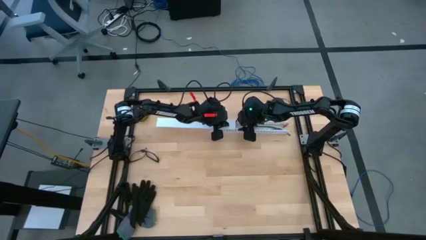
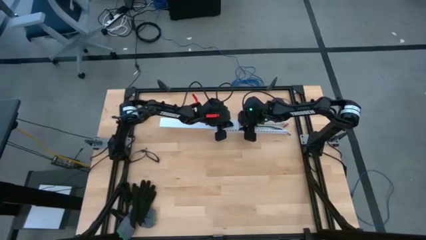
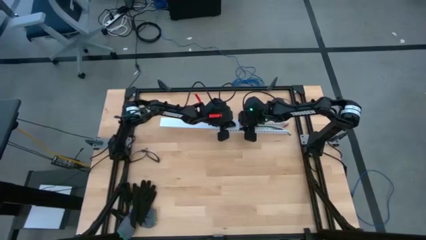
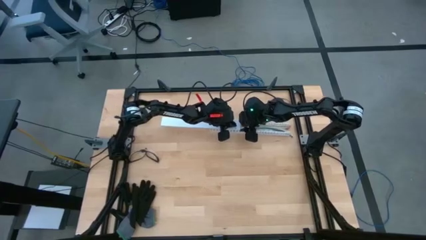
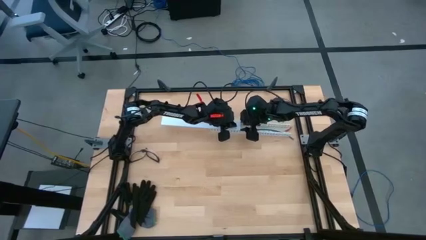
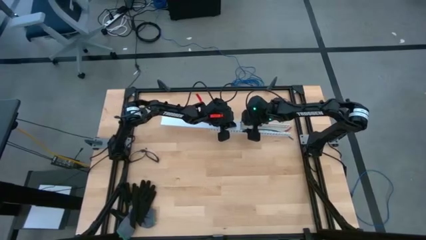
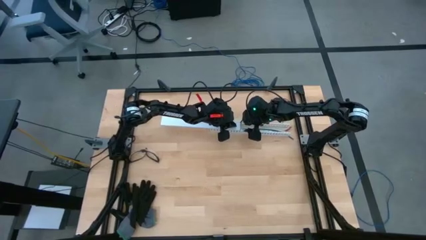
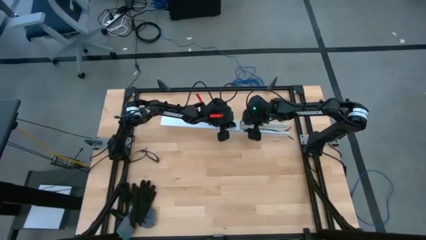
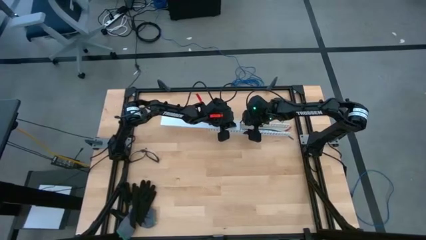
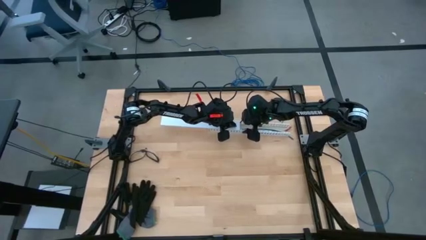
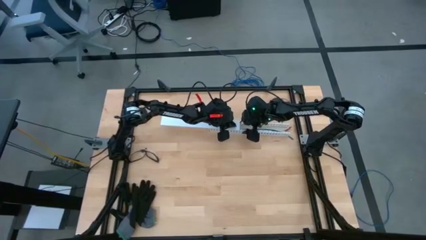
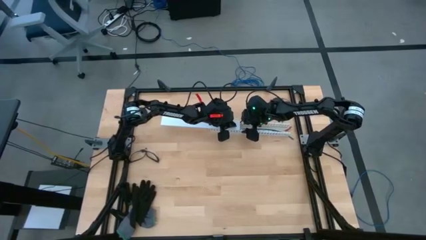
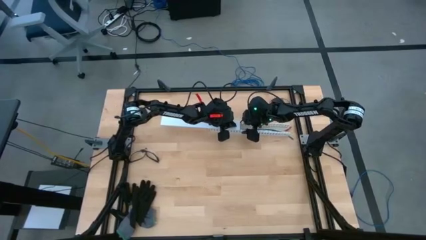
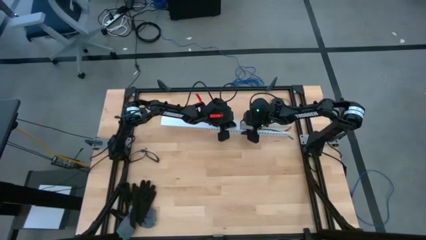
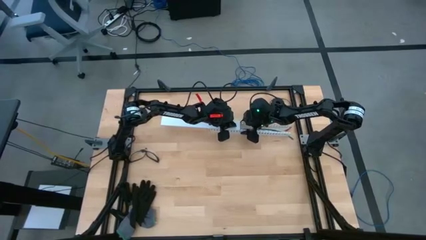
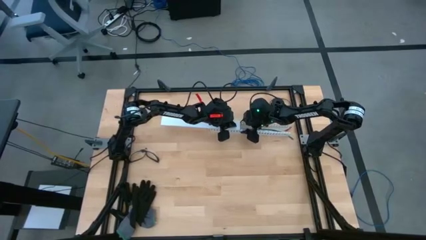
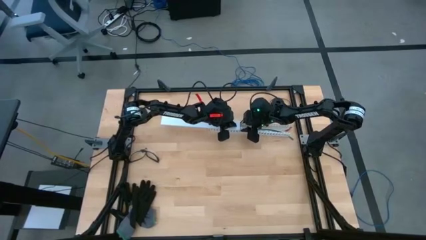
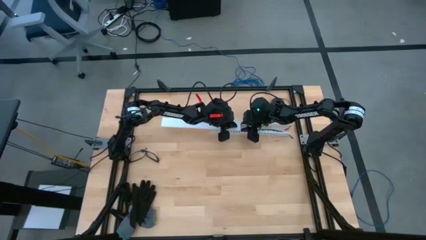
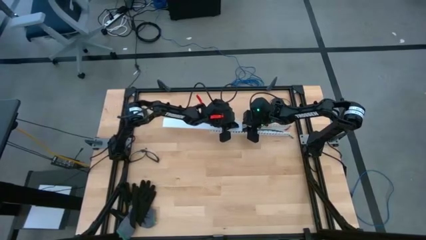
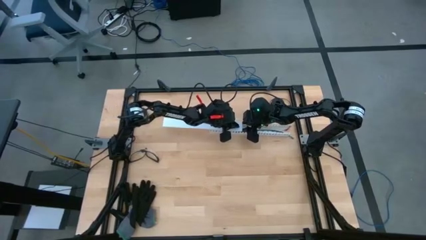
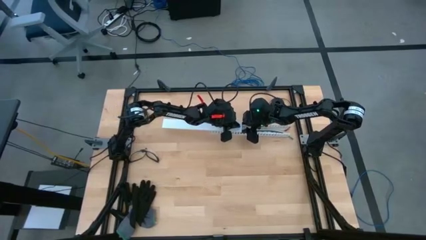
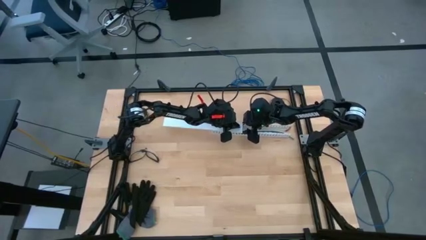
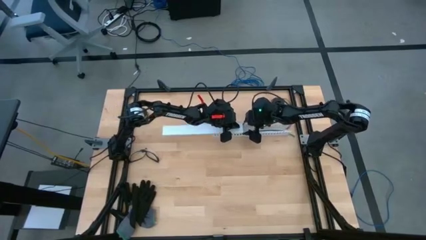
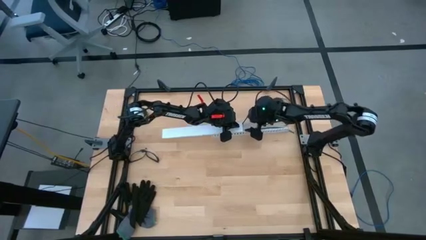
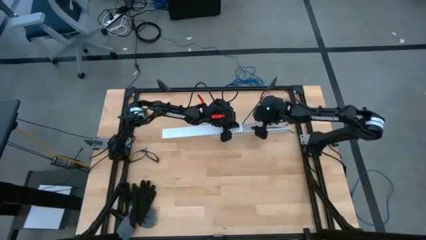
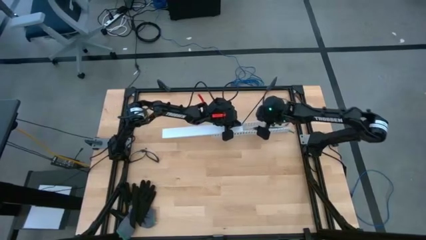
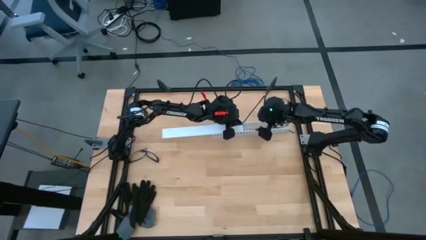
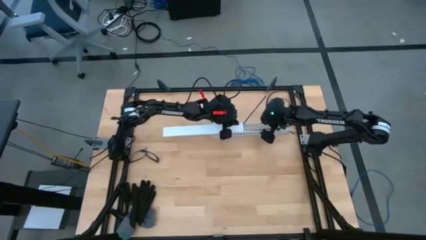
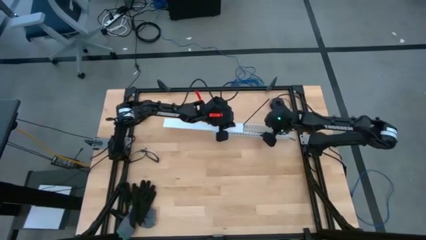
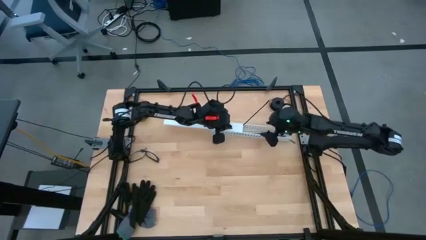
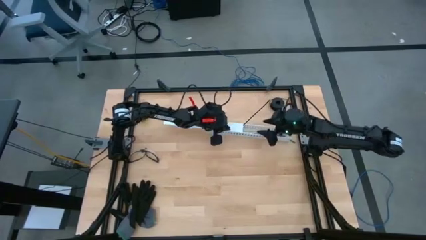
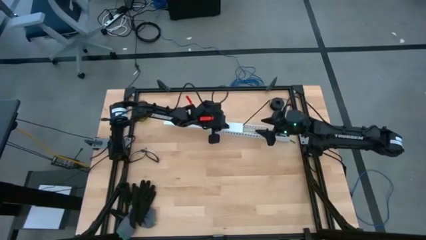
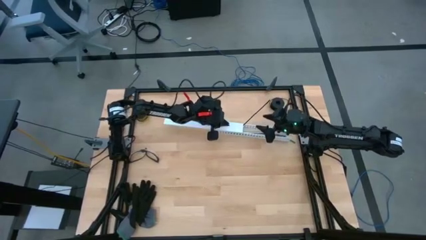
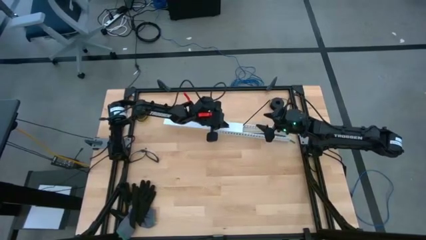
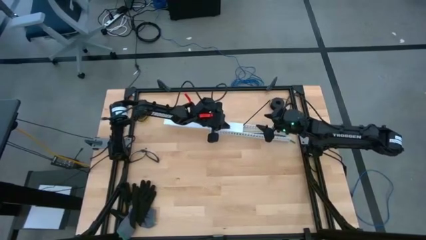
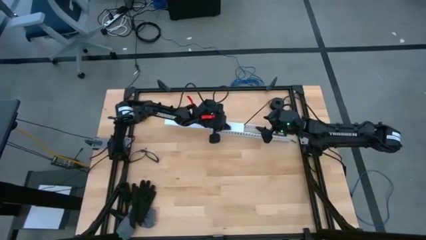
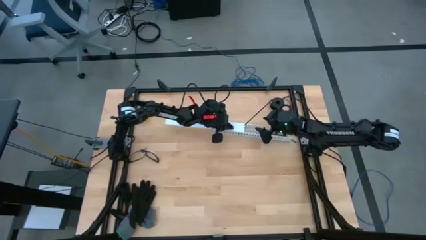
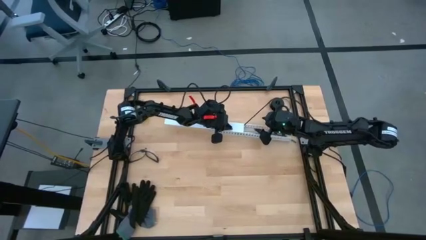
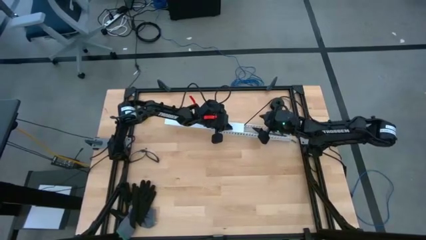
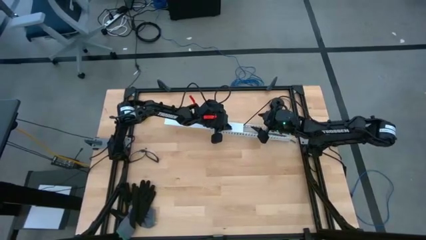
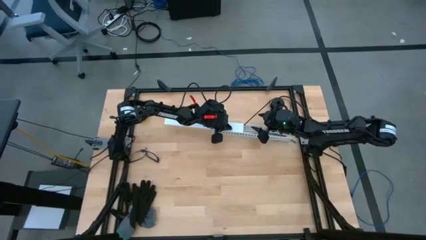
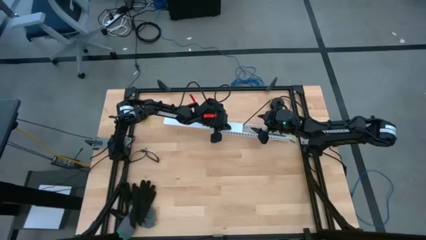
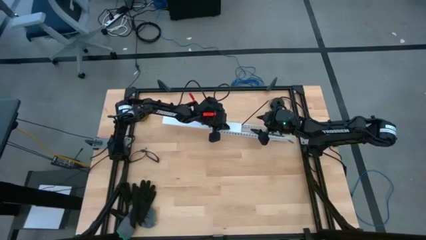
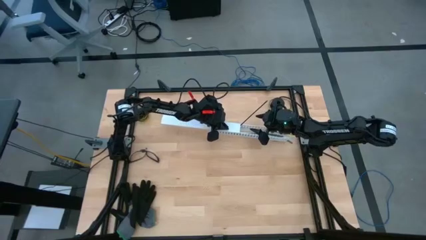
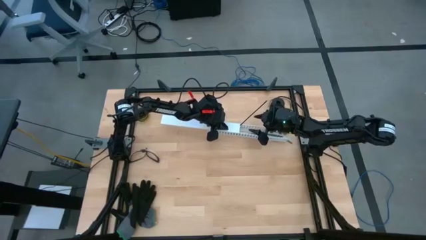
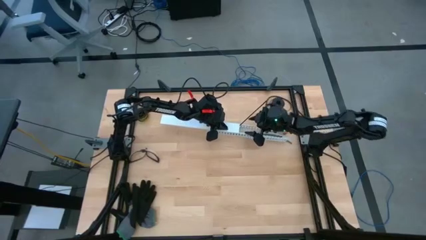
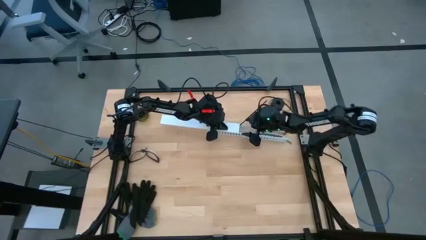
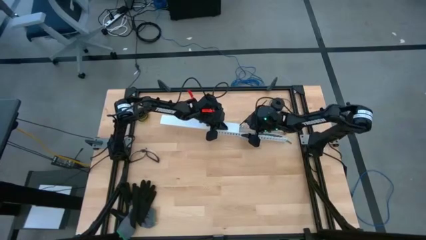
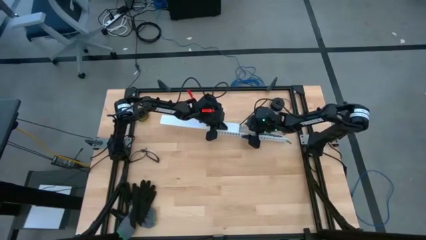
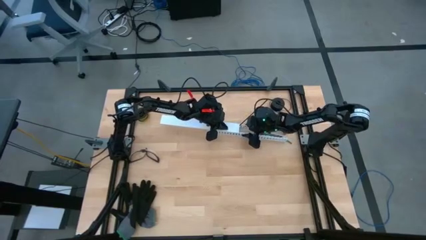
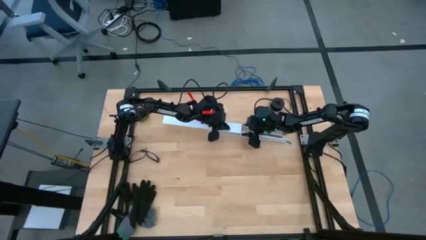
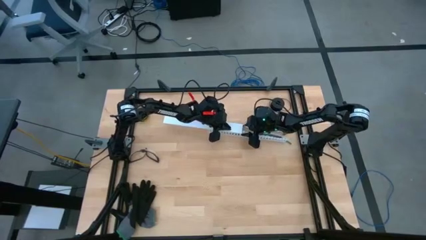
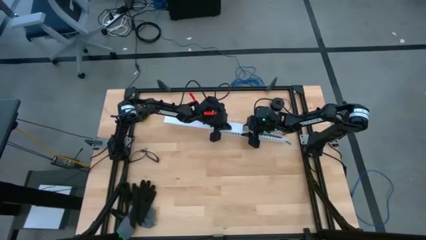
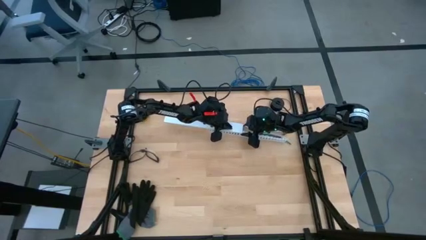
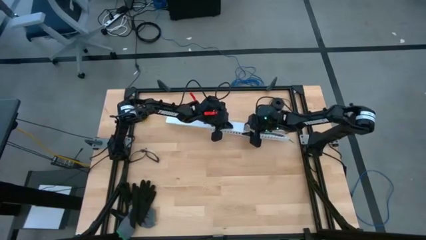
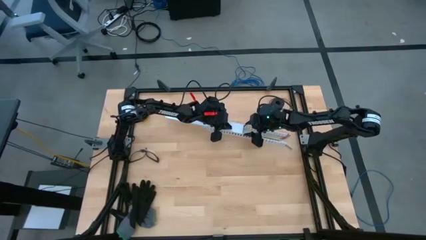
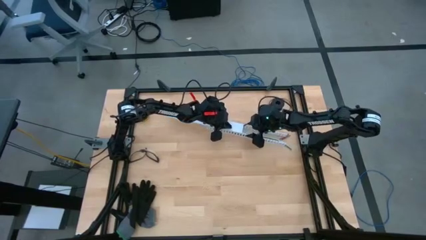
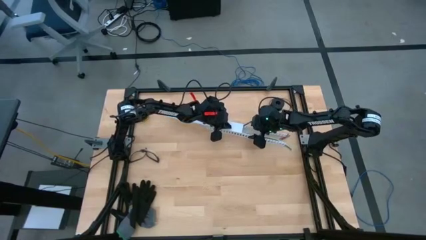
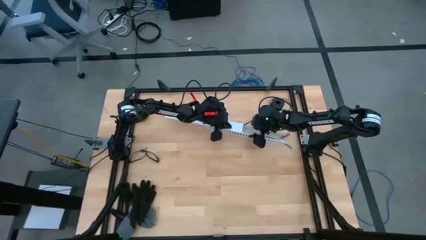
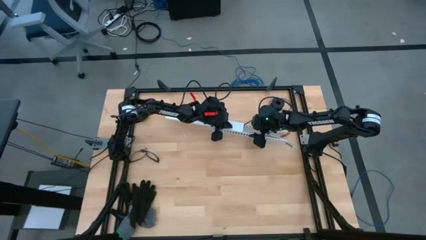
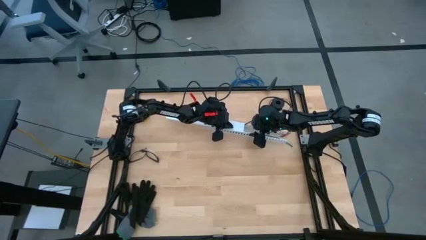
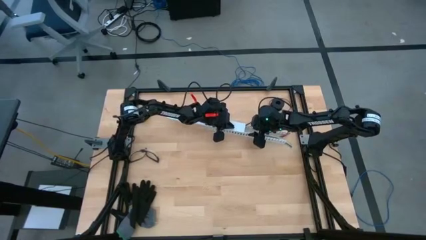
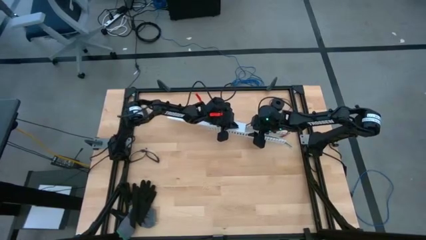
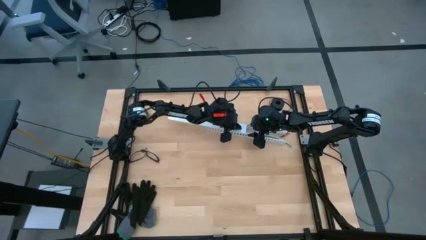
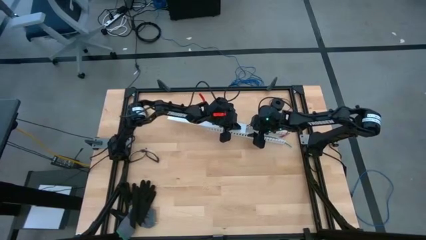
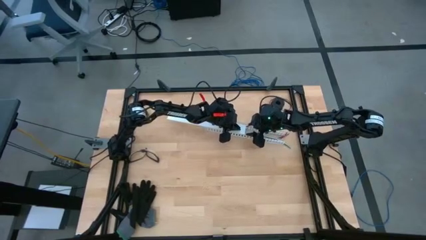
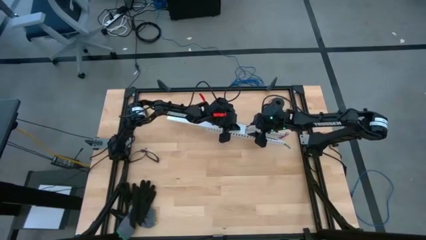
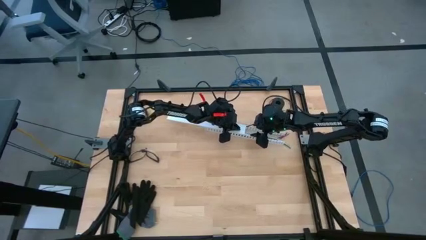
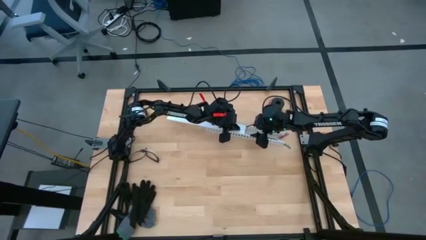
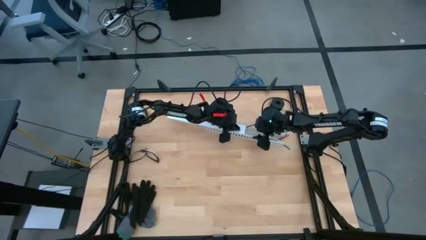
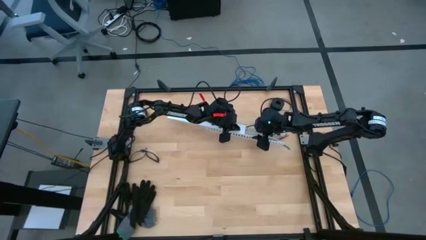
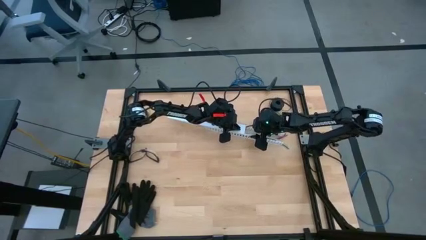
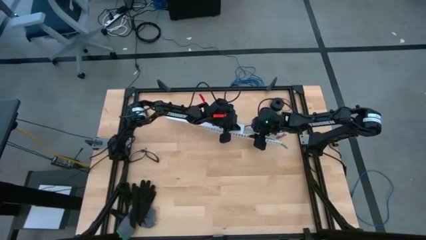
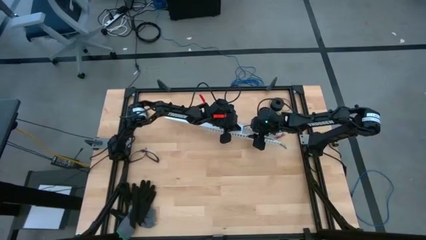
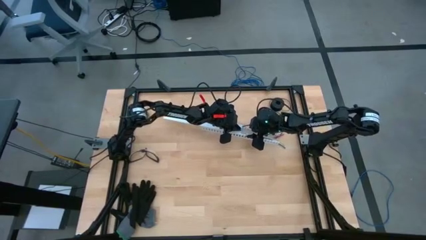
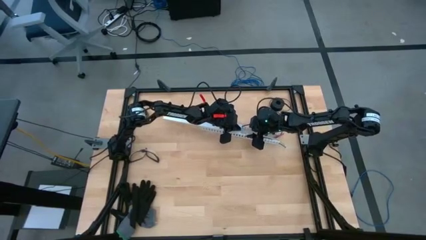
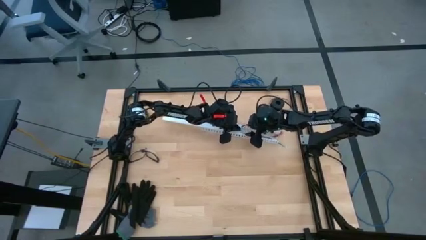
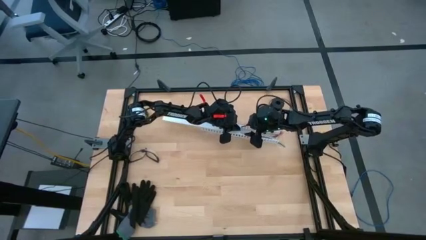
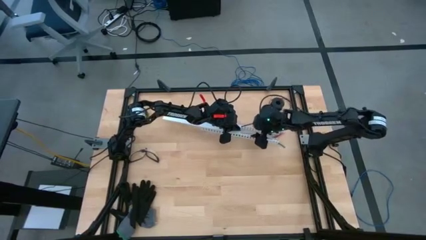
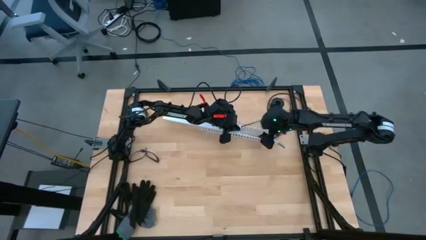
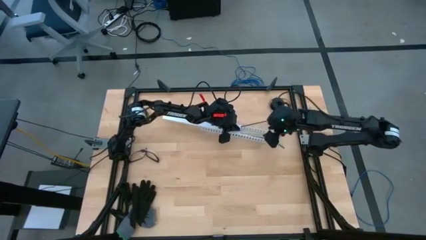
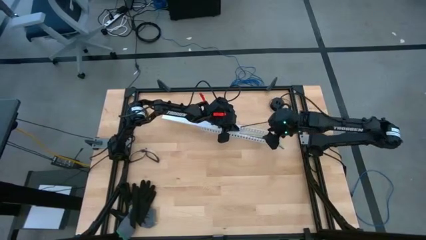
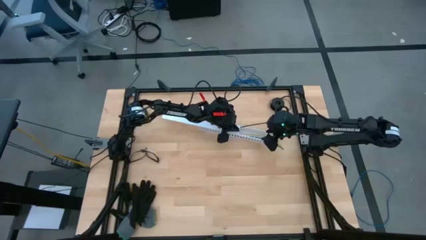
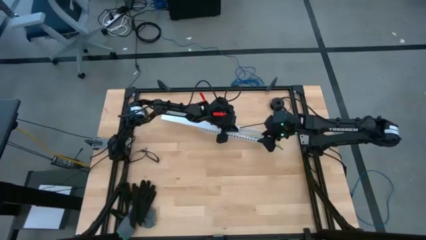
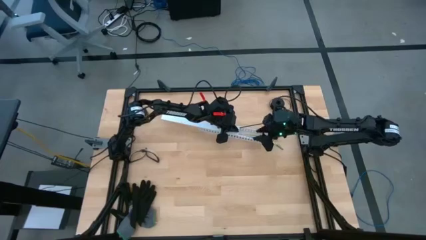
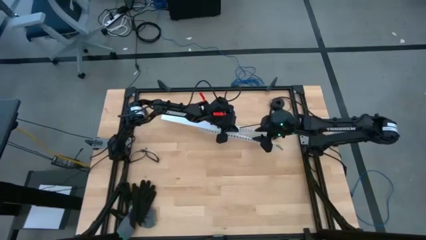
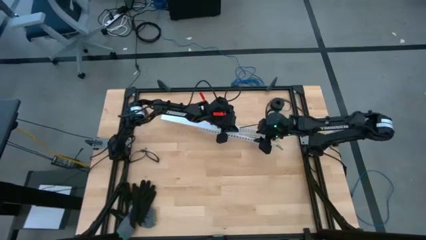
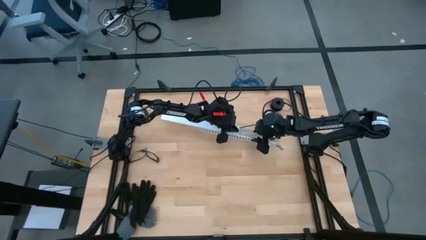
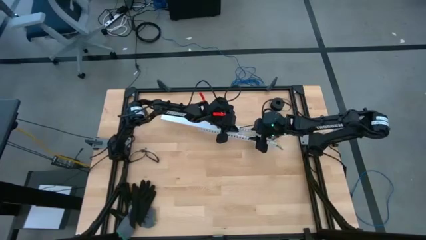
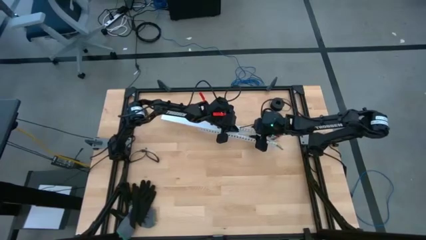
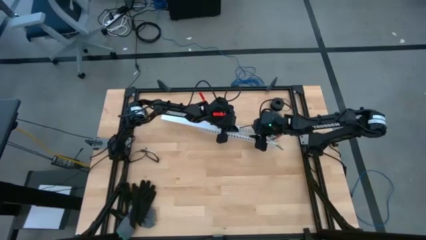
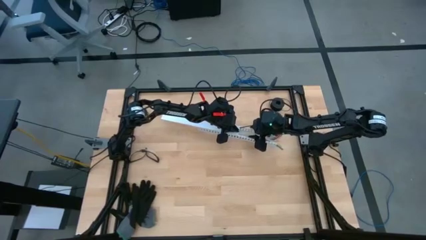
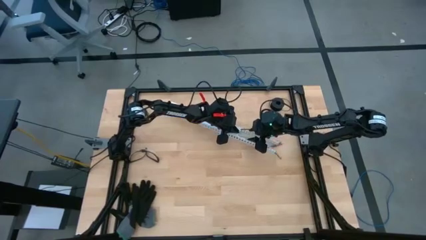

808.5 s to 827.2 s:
Task: Ziptie cables
Close the white cable duct
